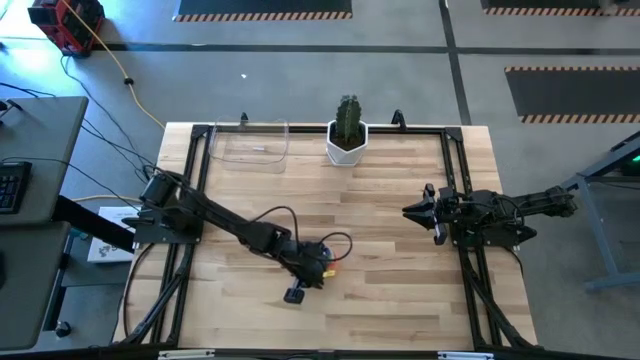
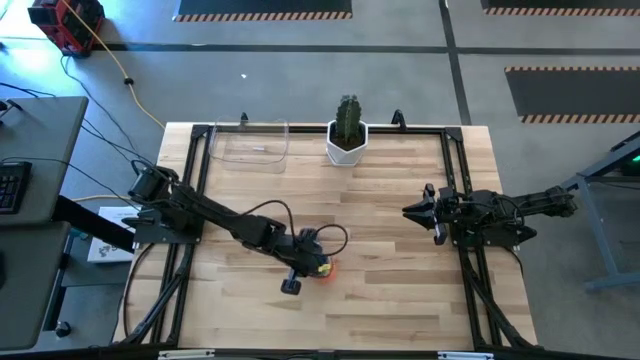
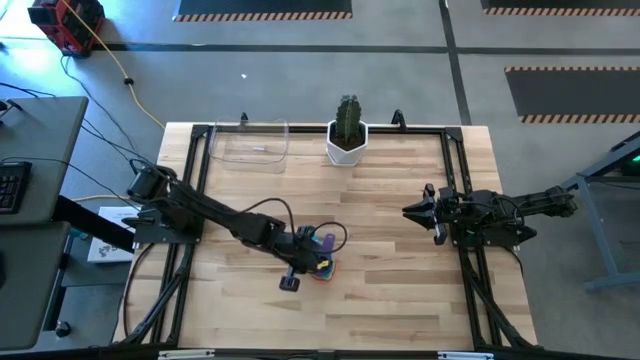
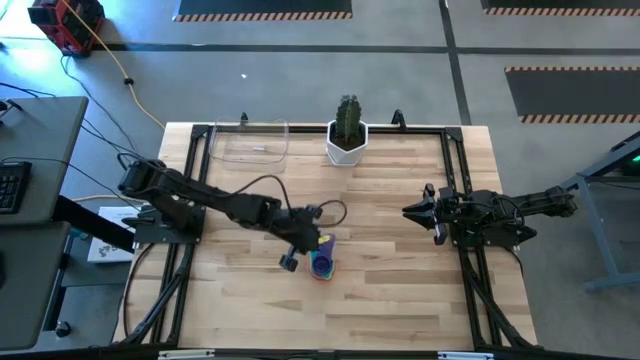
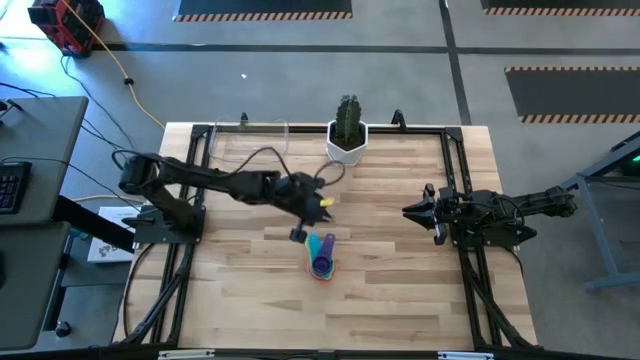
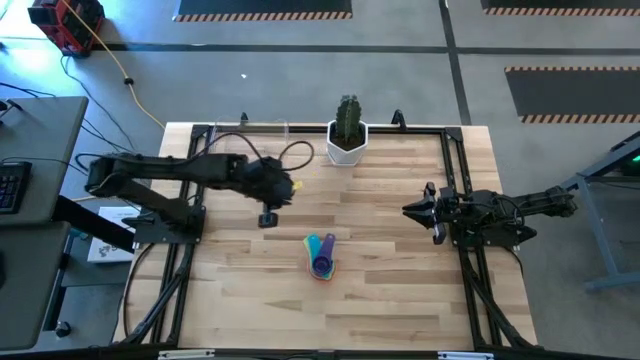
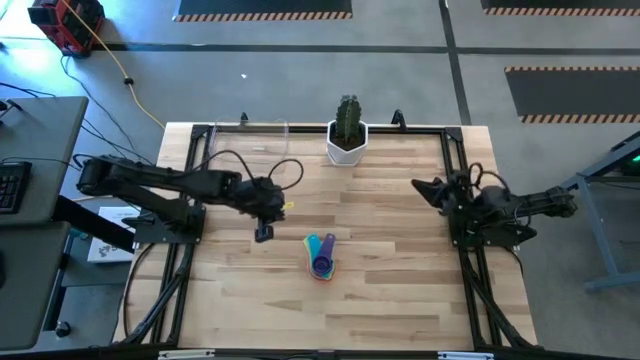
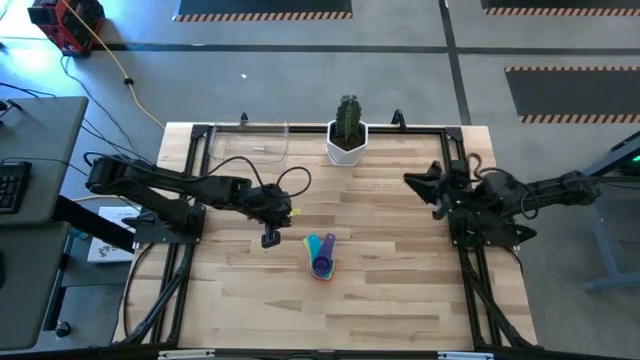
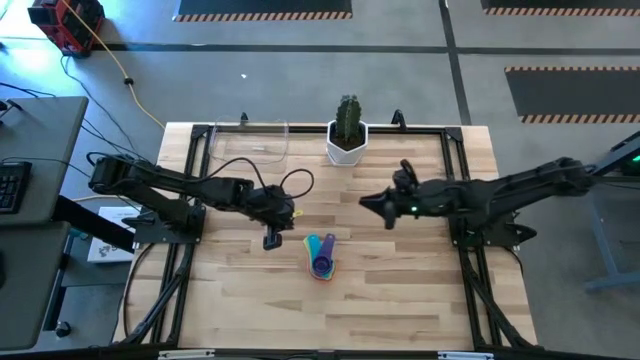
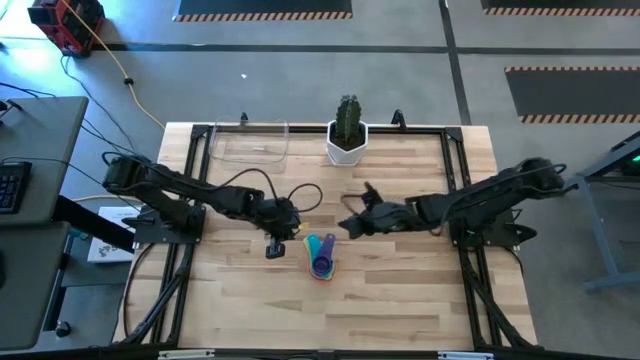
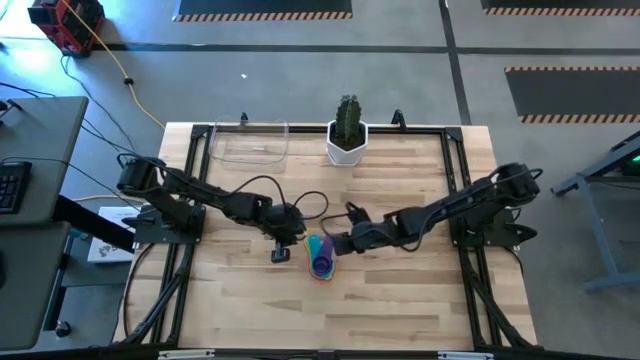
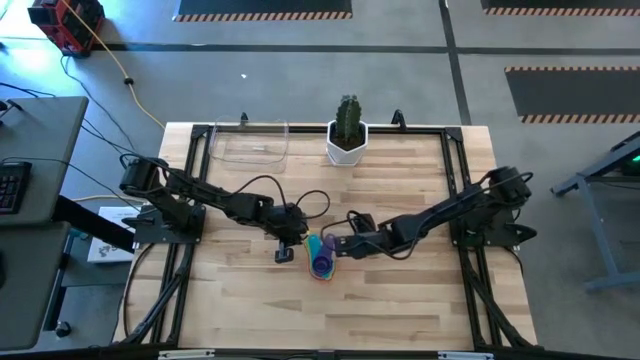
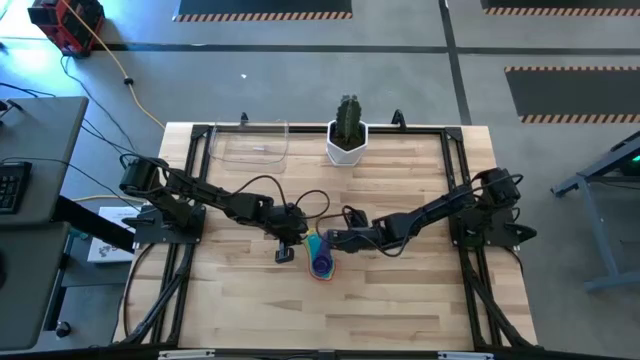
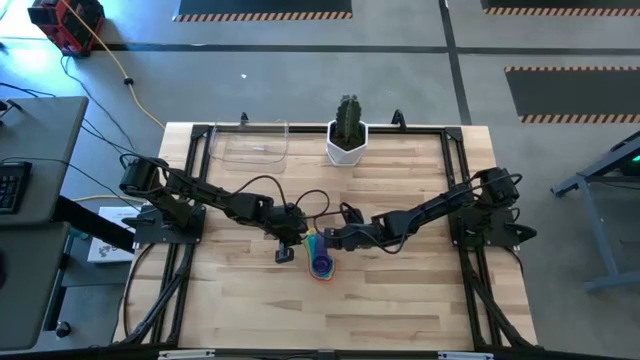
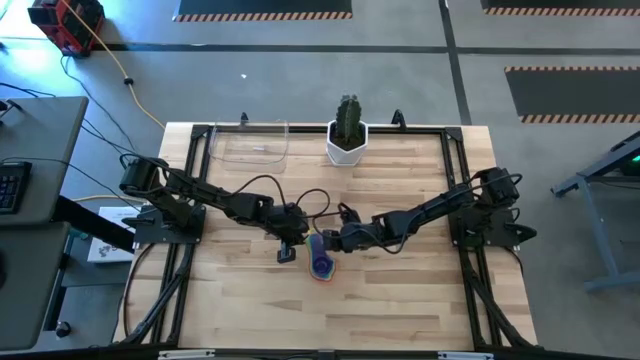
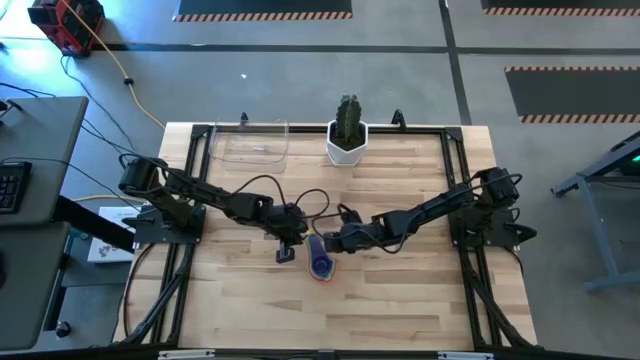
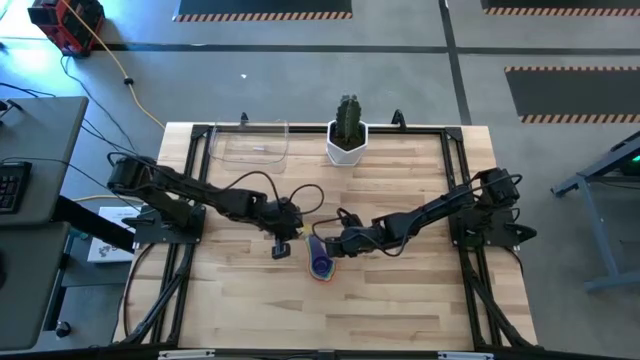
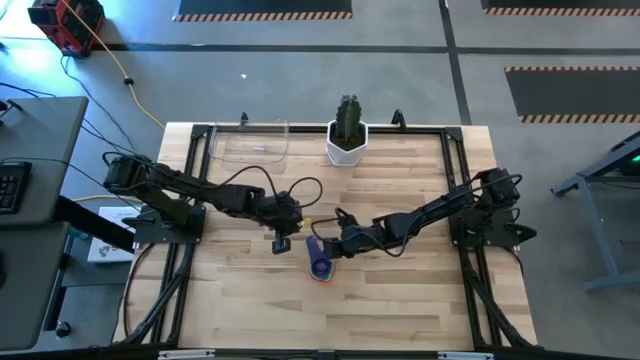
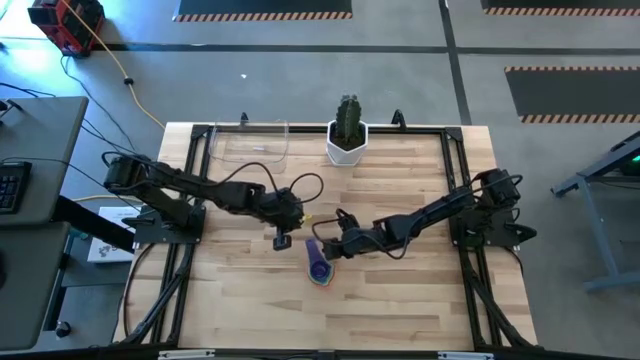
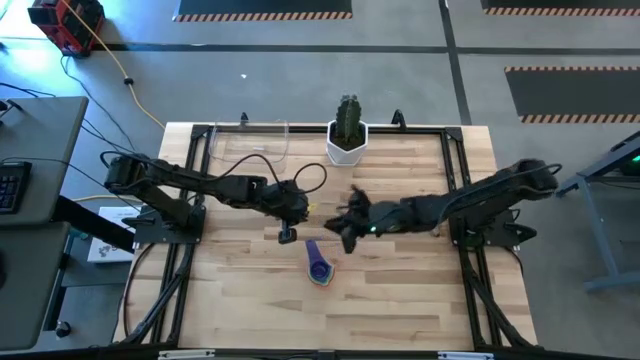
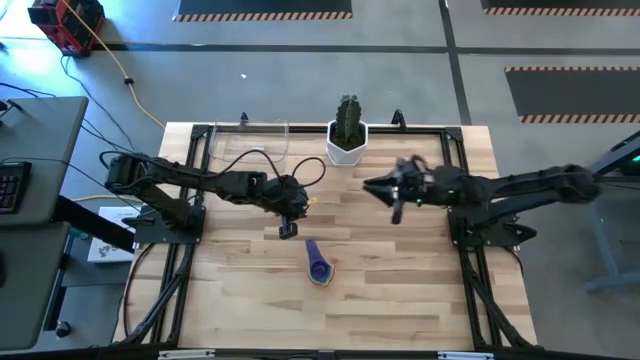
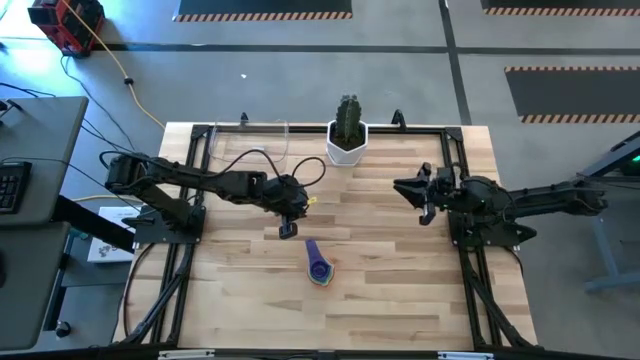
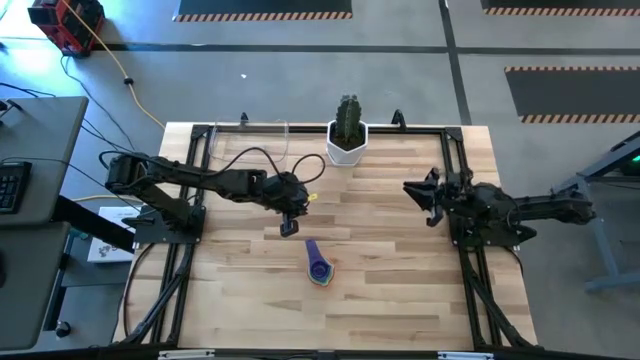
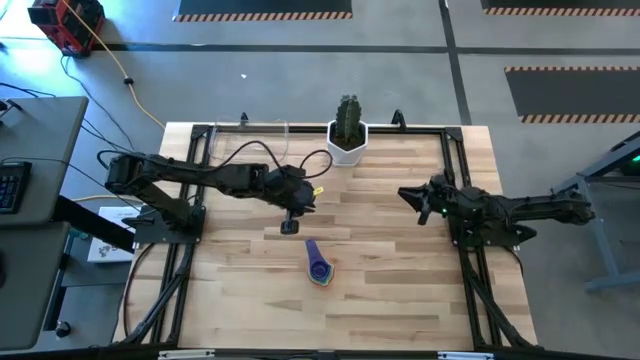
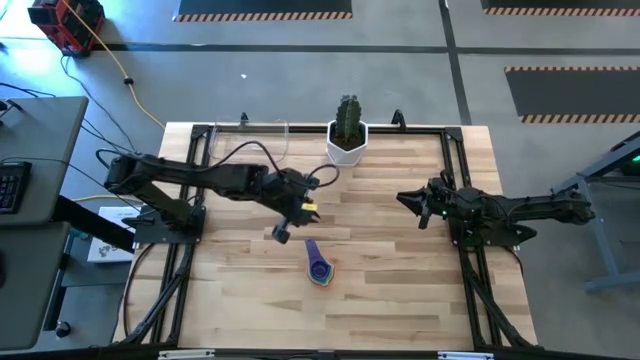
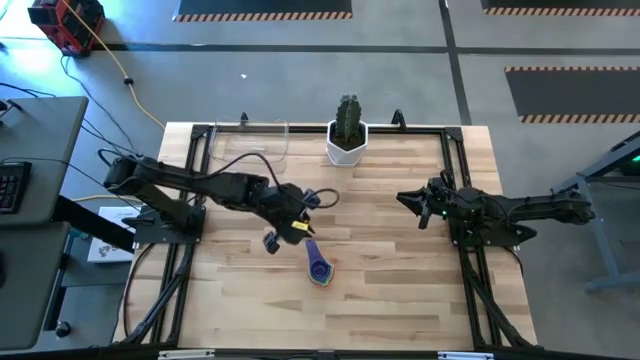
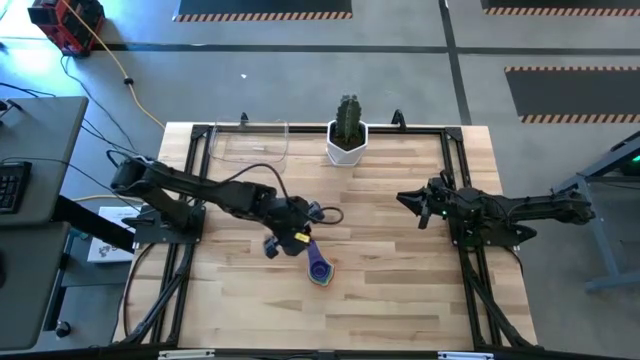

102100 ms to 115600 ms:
Task: Nest measuring cups in basket
Put the nested measuring cups into the transparent bin

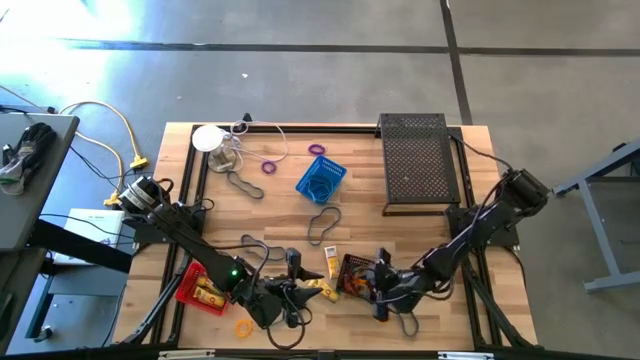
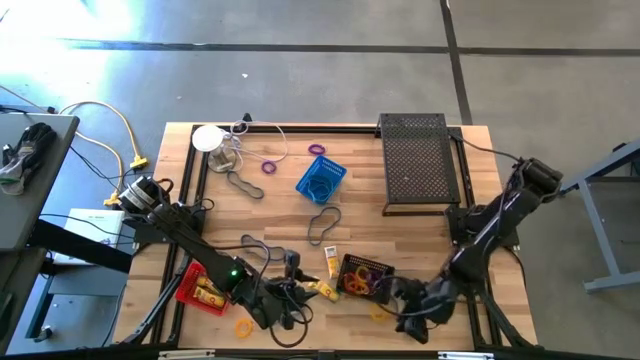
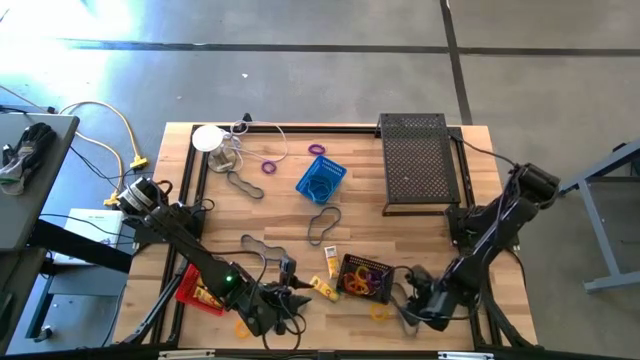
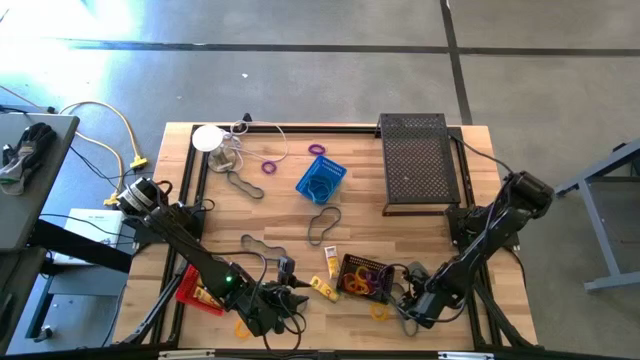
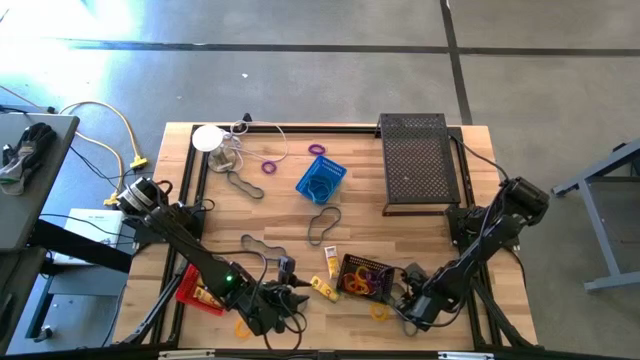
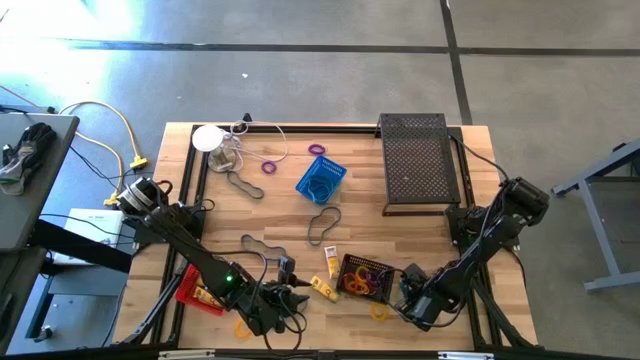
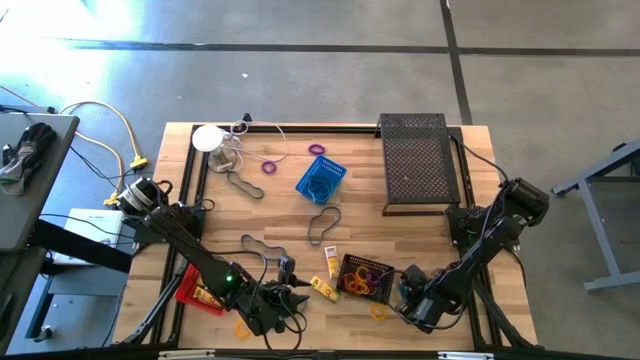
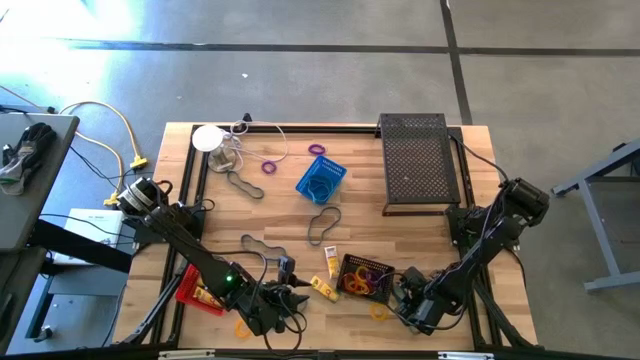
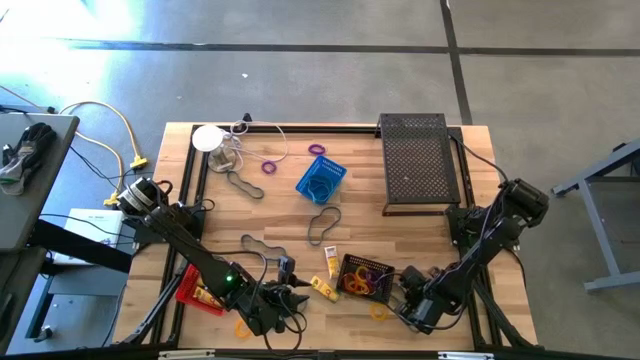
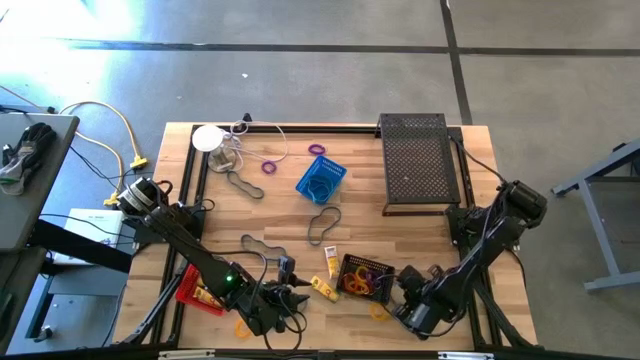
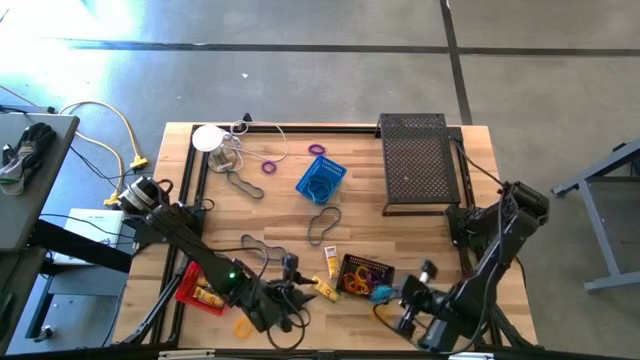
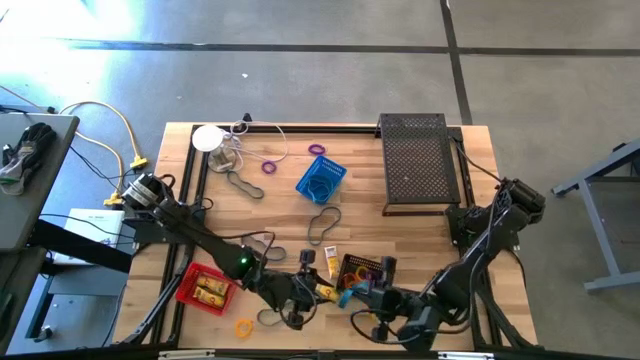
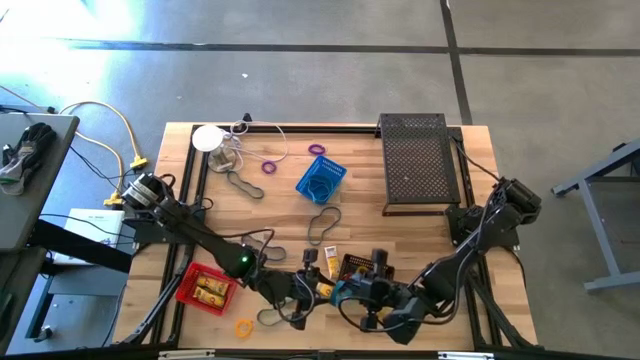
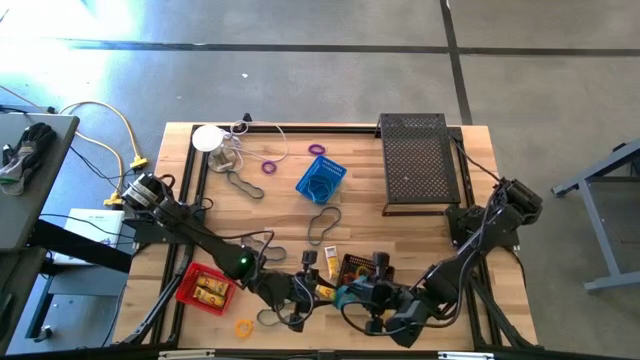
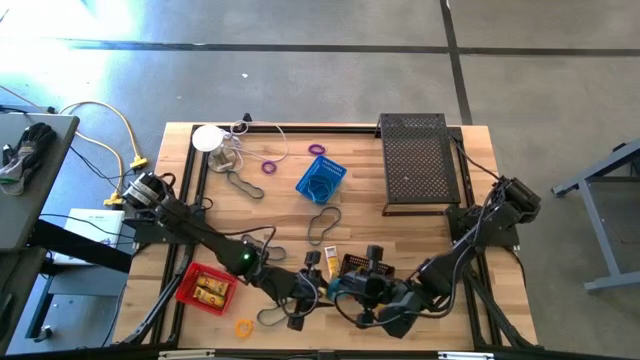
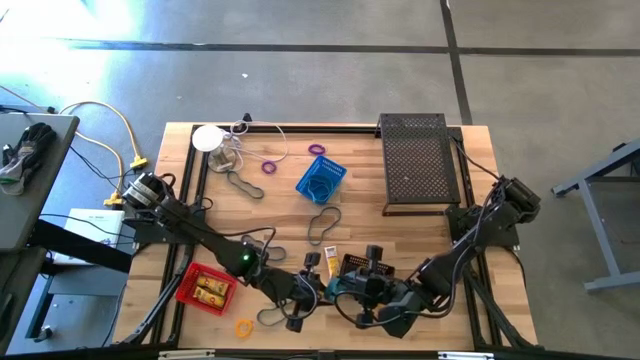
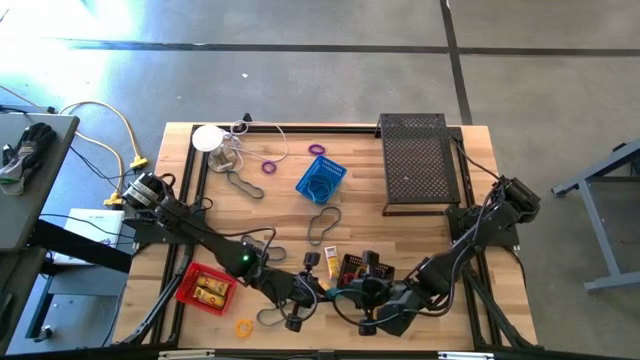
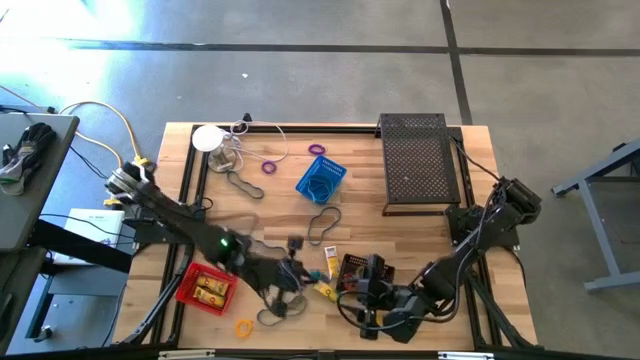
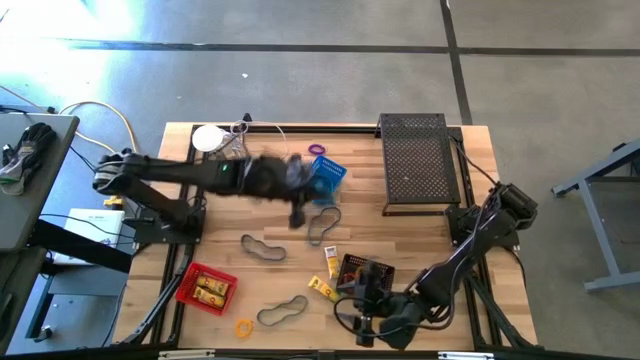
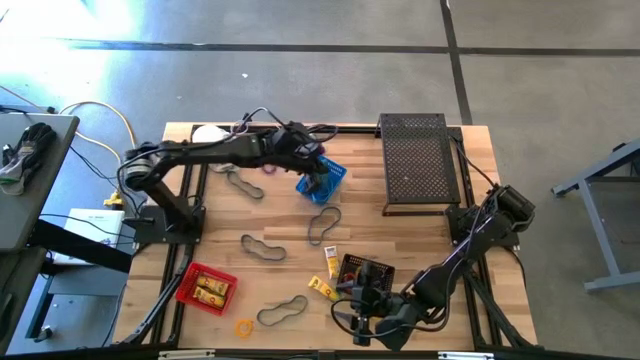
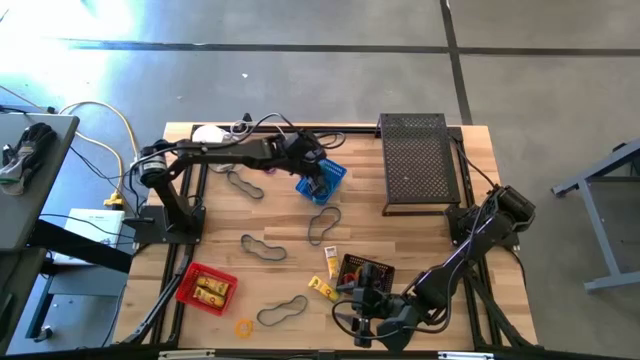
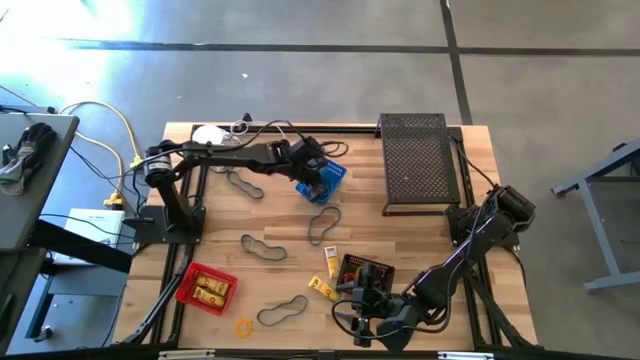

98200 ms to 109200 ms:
Task: Pick & Place Office Desk Supplies
Put the blue rubber band into the blue bin
